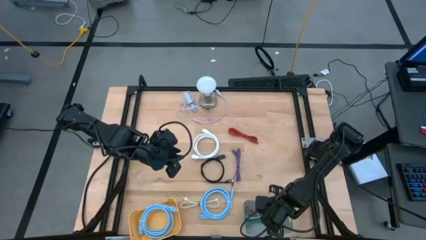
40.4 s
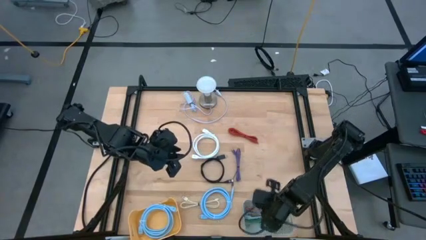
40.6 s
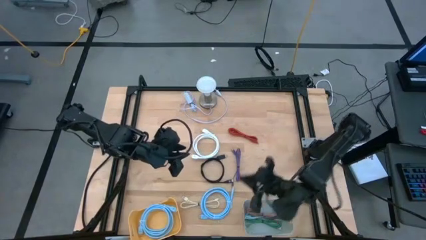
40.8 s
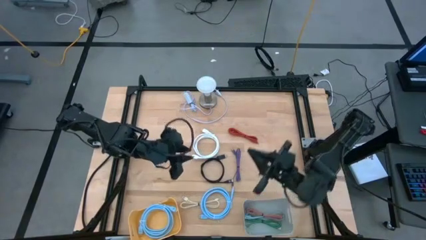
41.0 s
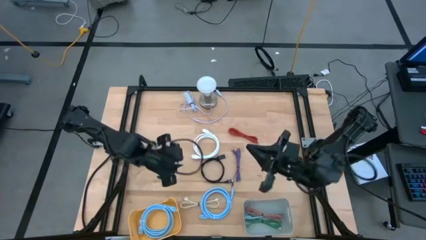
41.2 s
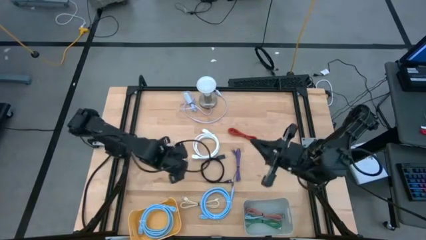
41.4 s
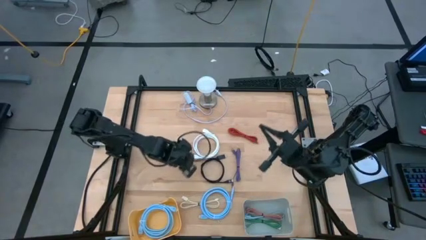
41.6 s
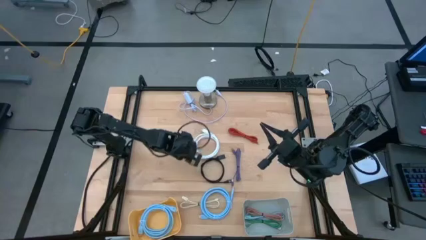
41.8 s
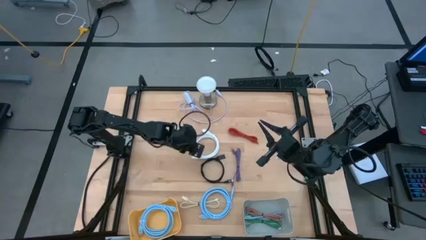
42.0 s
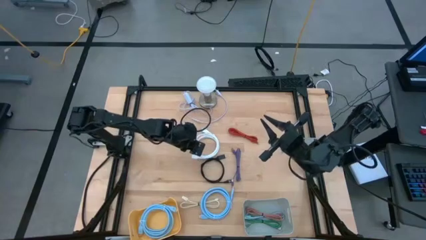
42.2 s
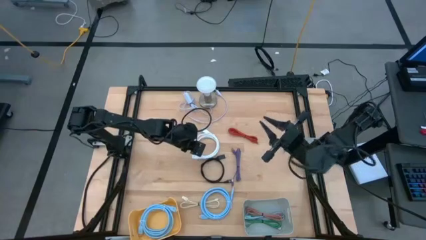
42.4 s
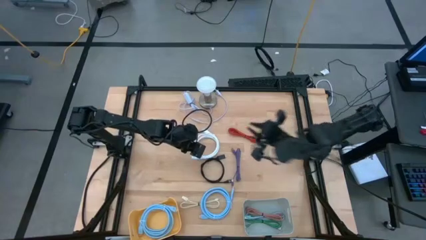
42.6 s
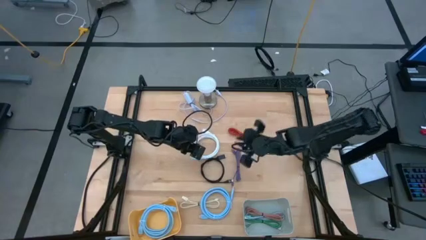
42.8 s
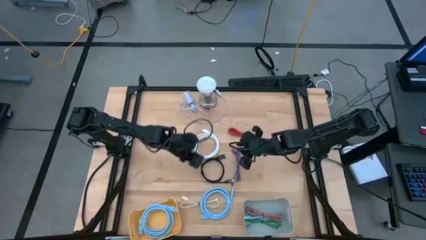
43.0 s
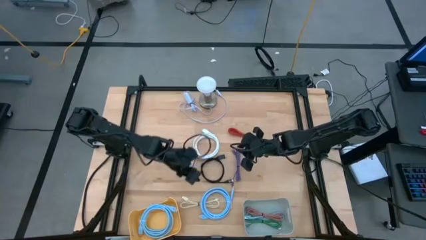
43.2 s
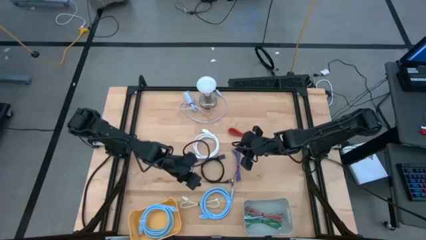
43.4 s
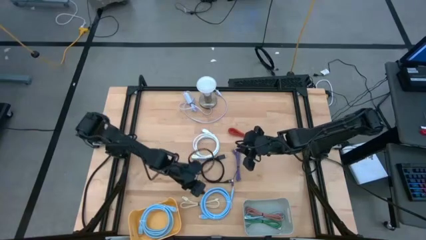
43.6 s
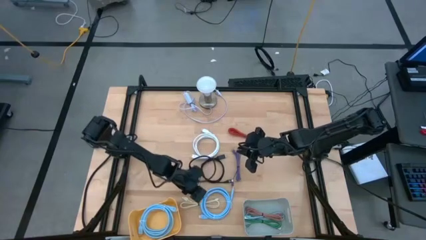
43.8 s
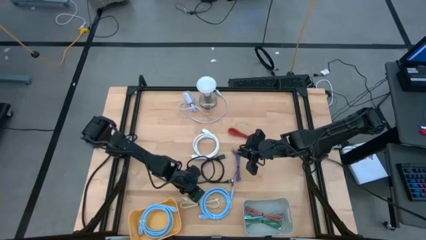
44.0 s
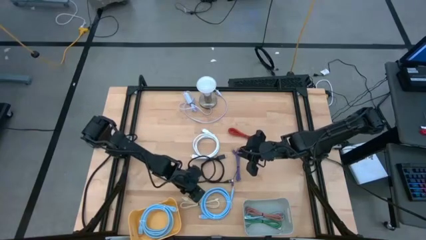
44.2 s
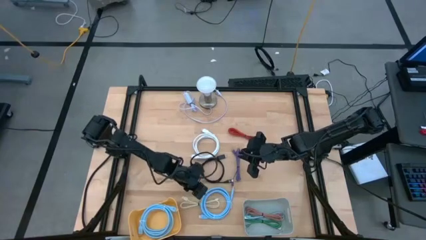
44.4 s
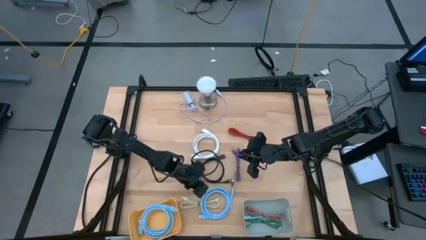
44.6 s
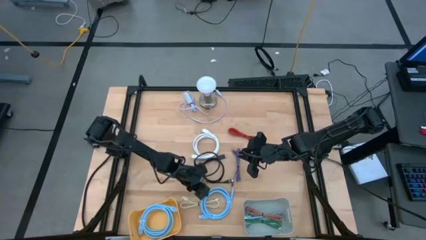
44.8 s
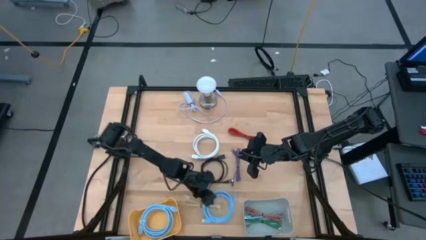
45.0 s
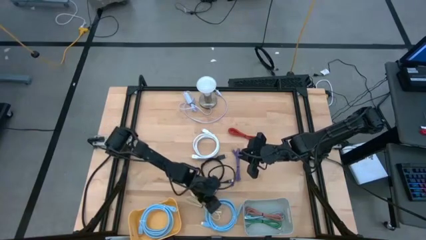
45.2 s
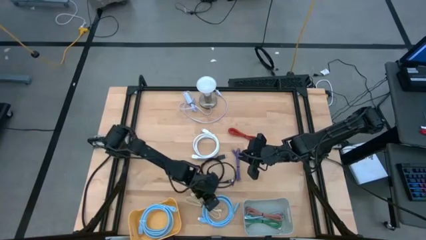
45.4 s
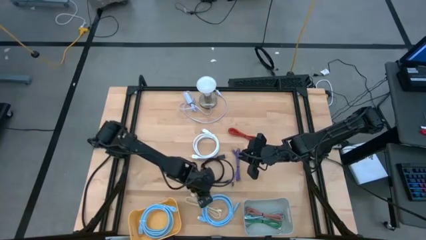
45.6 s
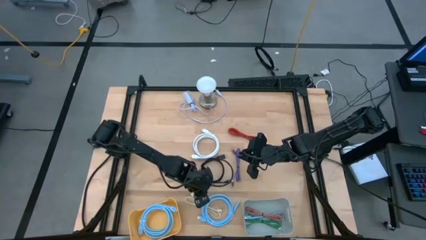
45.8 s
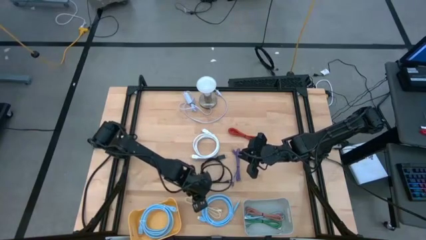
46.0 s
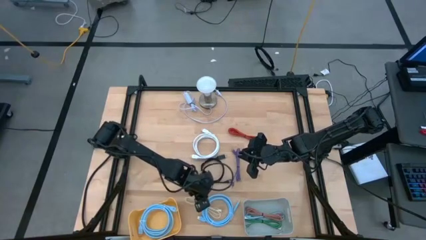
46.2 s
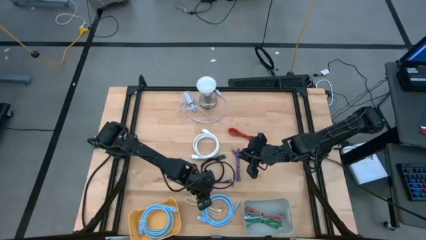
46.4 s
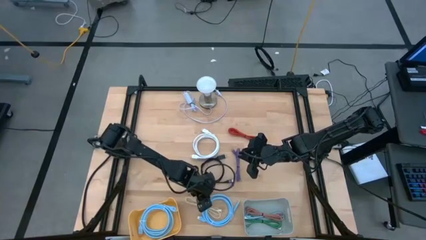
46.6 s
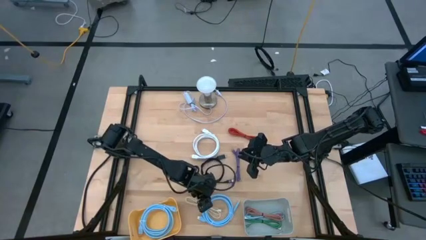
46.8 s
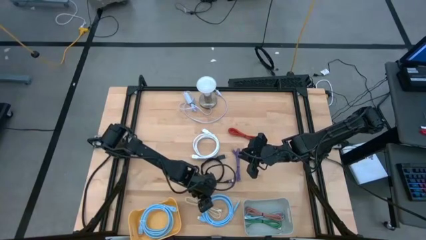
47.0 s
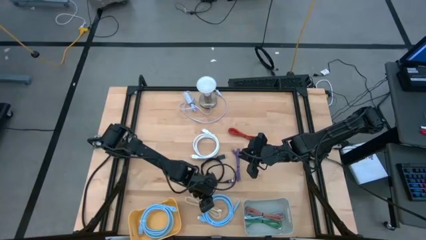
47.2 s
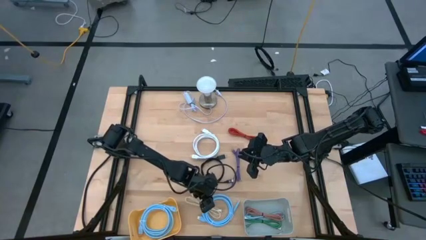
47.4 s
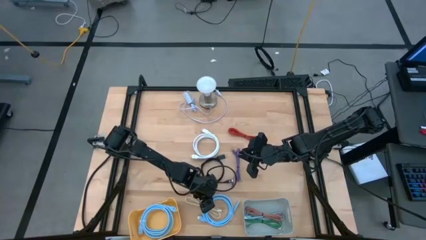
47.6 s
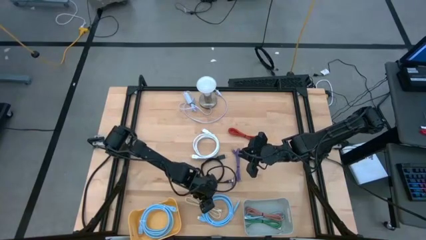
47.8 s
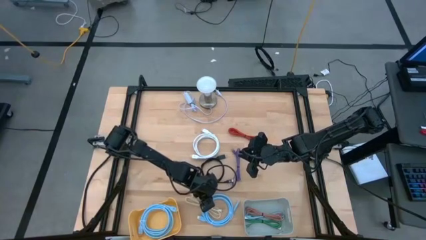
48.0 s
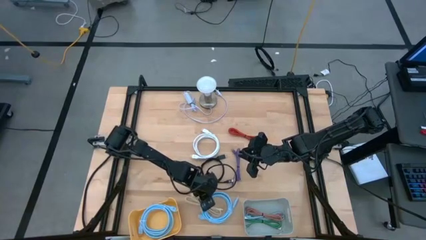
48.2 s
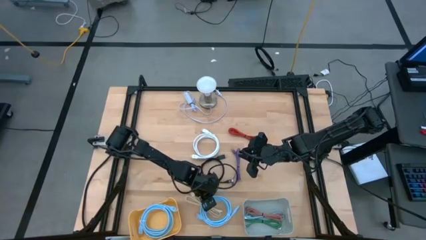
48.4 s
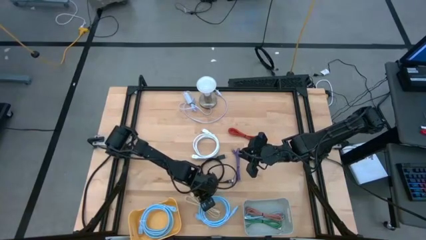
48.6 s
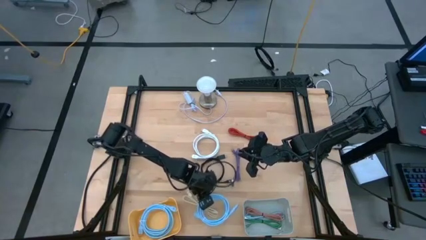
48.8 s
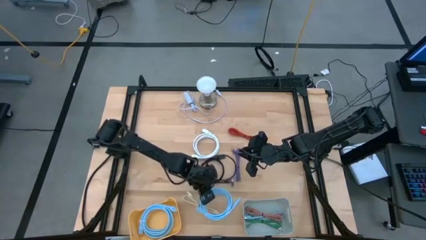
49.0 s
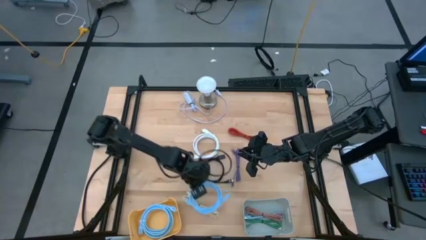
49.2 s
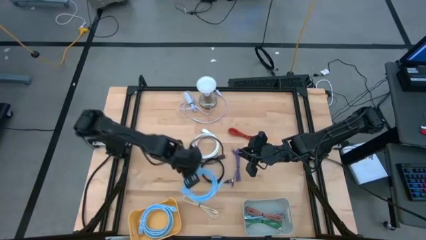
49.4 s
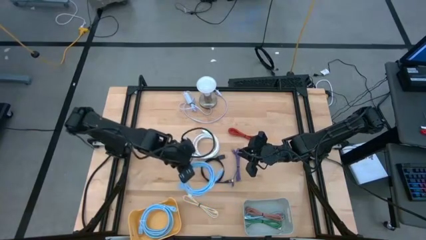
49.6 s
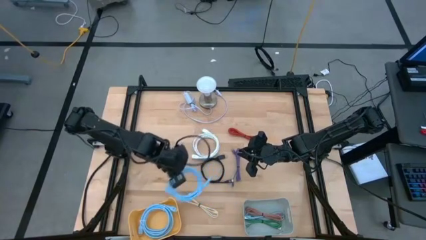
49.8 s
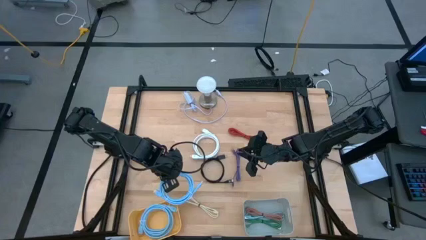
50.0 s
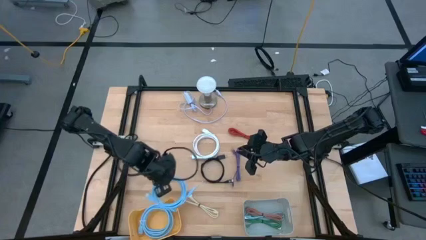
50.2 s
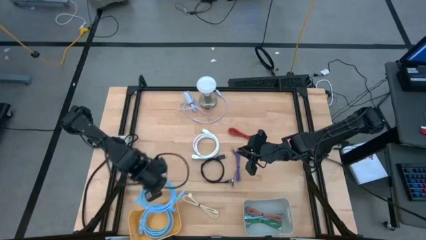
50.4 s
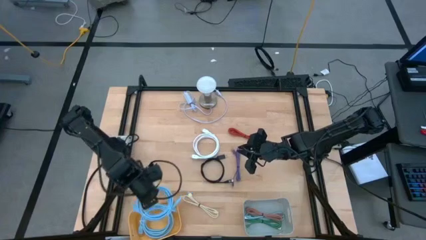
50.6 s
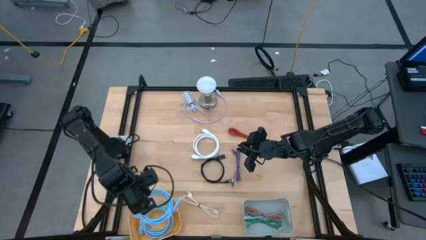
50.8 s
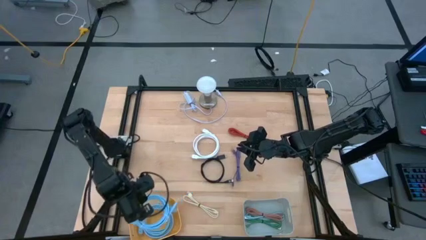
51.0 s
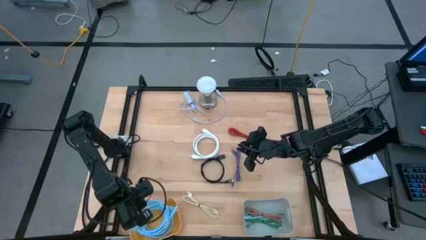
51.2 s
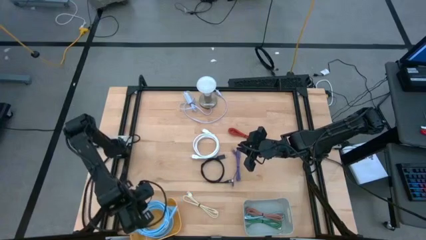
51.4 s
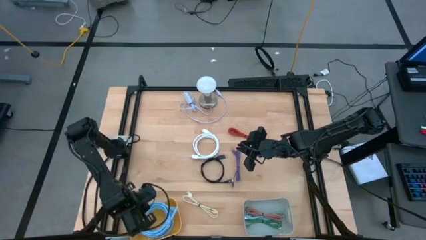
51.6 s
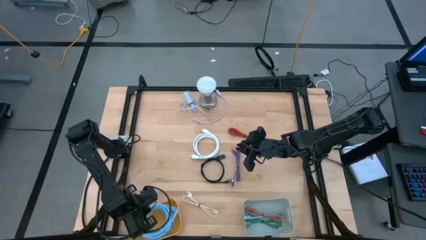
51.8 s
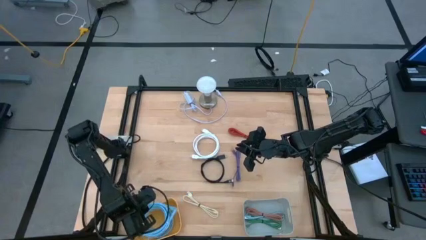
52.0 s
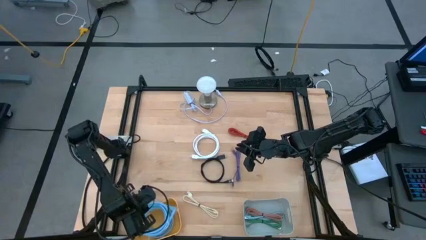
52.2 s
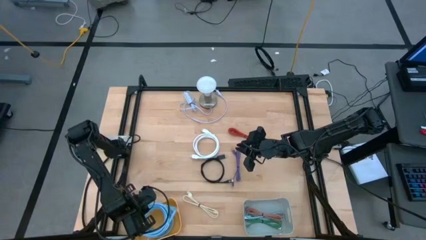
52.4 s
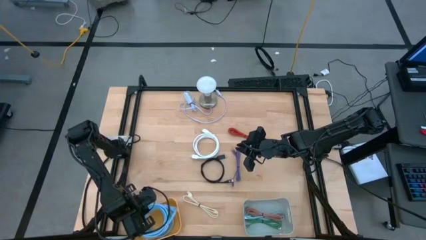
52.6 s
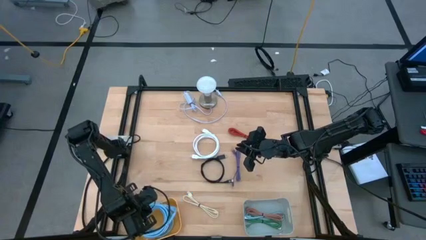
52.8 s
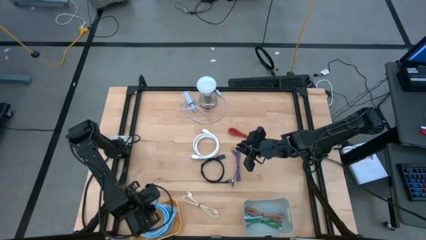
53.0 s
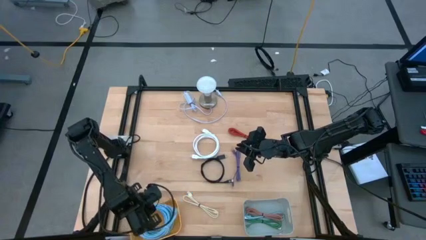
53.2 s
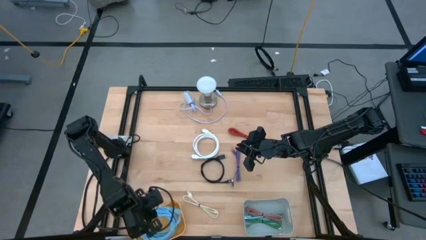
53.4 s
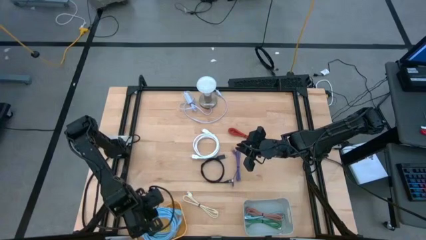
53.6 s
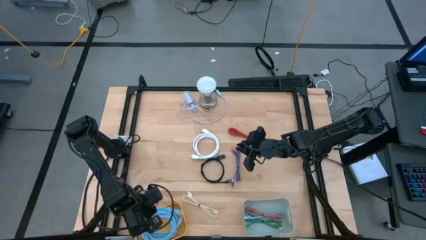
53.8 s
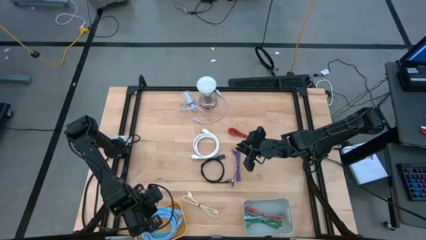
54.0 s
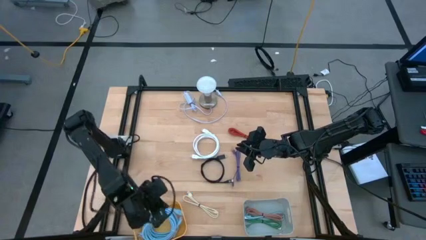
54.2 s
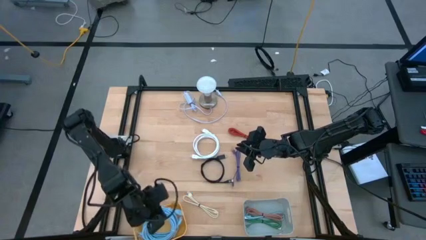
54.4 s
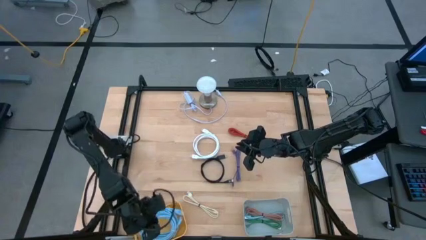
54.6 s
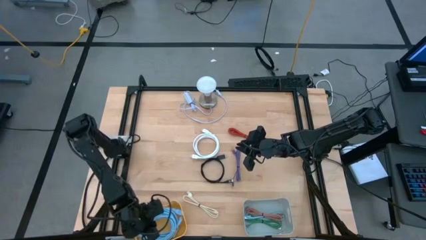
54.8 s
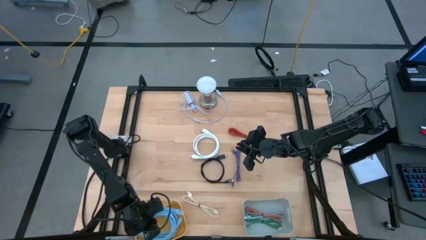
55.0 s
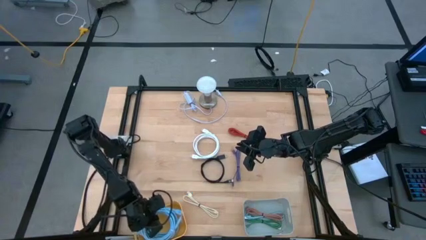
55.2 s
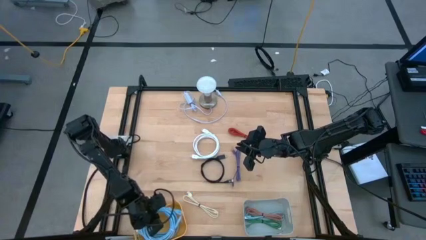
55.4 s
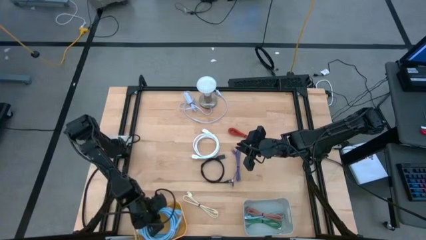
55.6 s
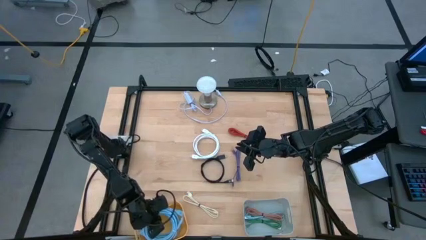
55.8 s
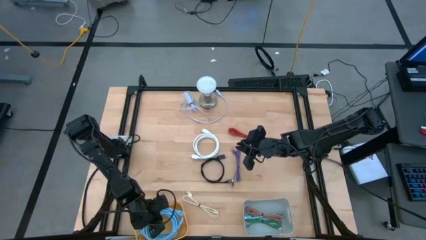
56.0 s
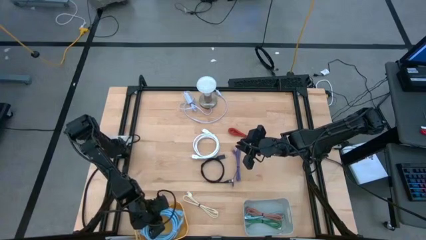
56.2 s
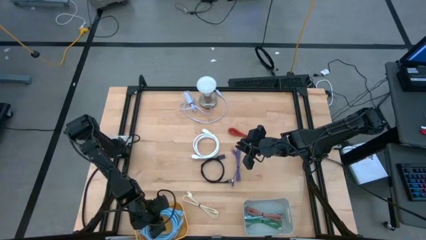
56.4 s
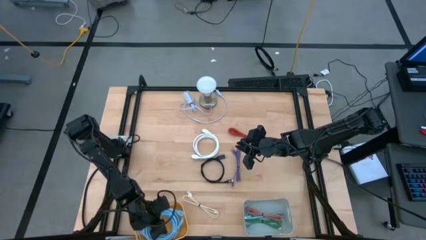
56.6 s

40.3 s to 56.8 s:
Task: Pick & Place USB Port
Put the blue HDMI cable into the orange bin
